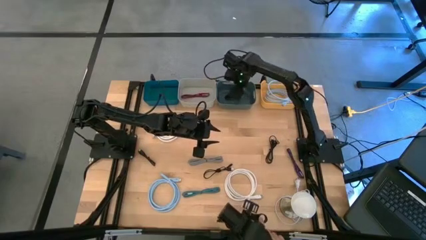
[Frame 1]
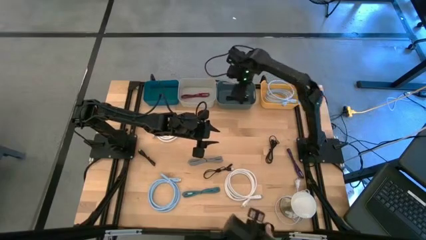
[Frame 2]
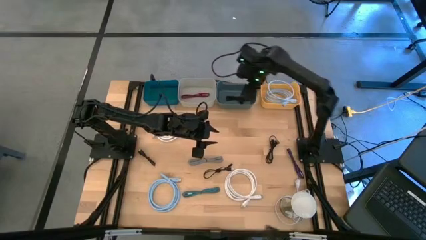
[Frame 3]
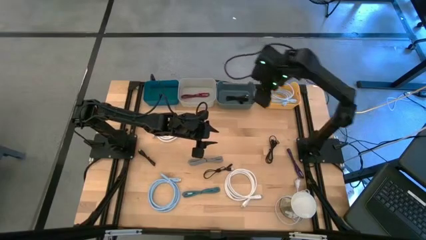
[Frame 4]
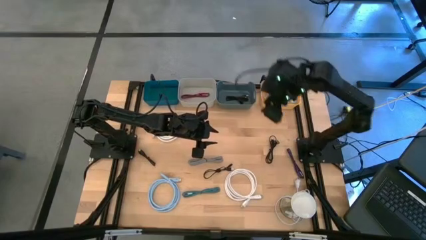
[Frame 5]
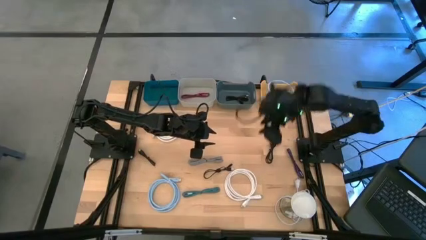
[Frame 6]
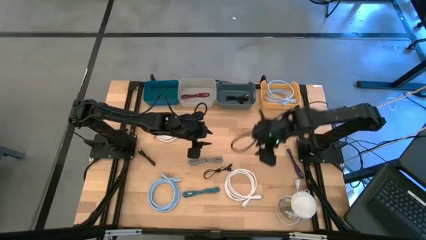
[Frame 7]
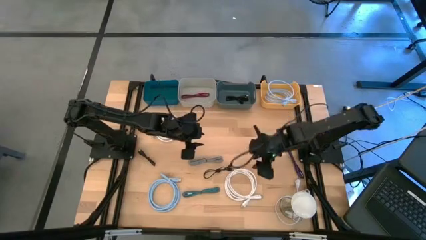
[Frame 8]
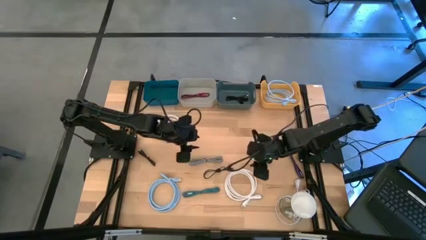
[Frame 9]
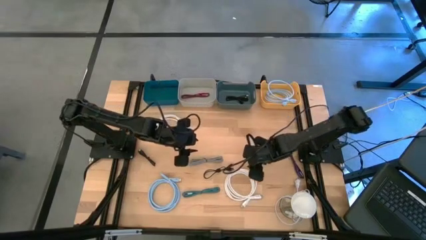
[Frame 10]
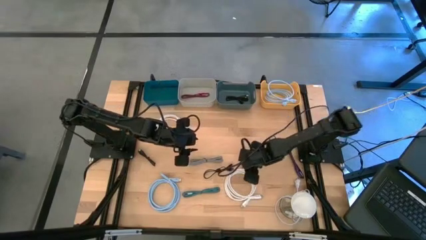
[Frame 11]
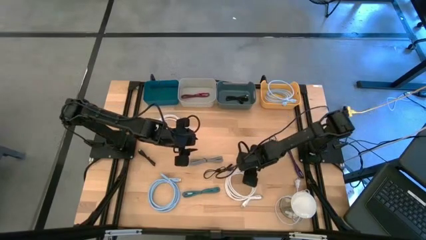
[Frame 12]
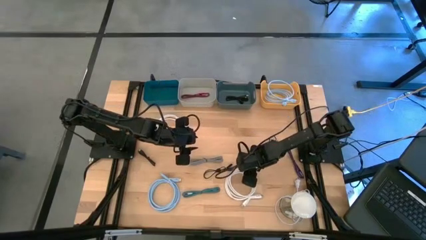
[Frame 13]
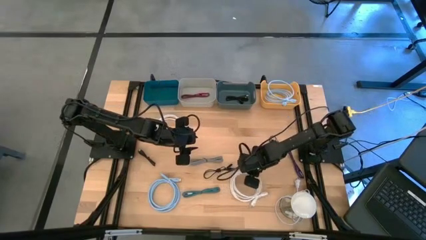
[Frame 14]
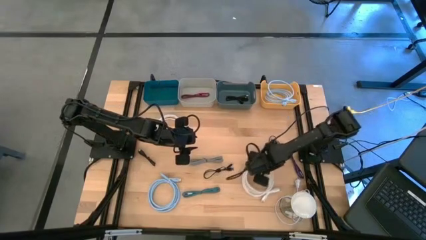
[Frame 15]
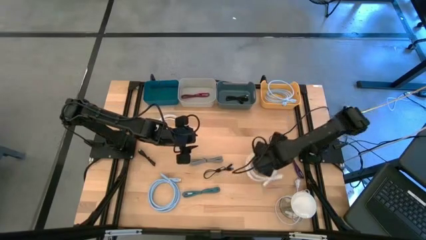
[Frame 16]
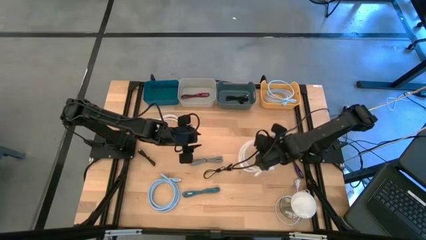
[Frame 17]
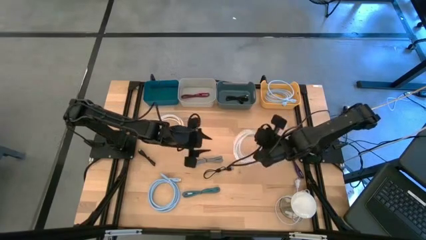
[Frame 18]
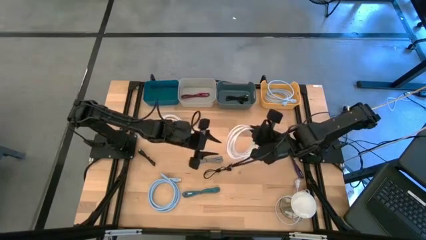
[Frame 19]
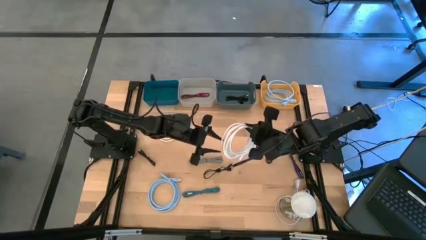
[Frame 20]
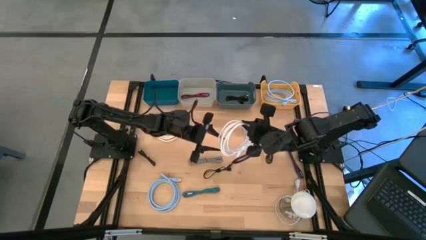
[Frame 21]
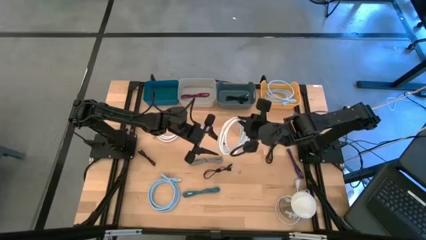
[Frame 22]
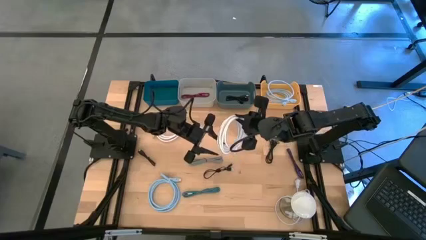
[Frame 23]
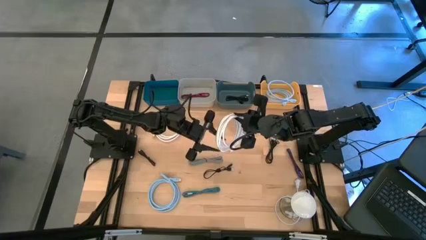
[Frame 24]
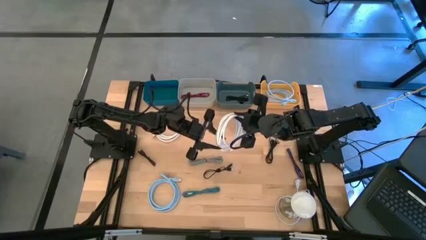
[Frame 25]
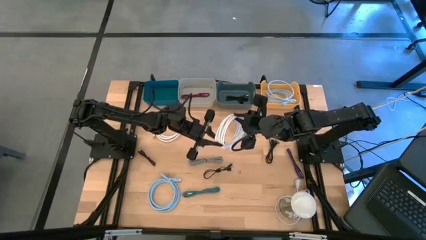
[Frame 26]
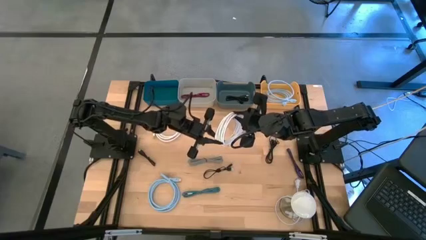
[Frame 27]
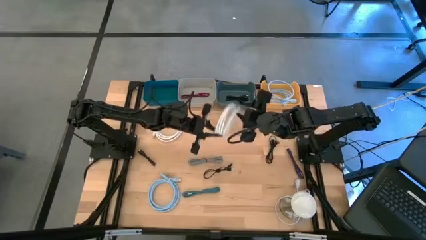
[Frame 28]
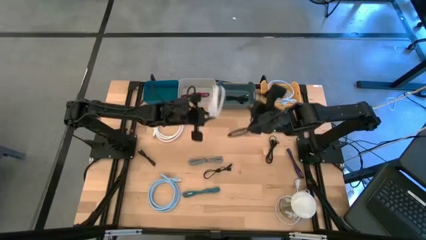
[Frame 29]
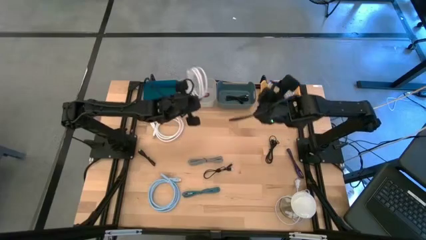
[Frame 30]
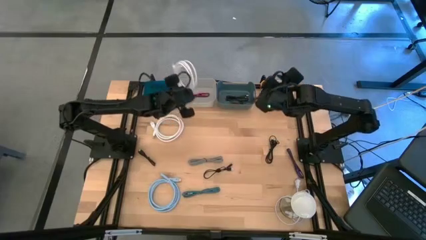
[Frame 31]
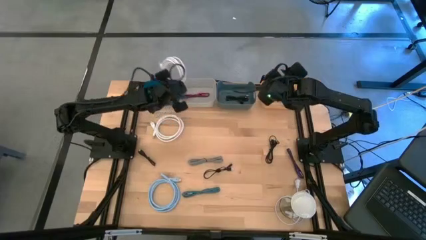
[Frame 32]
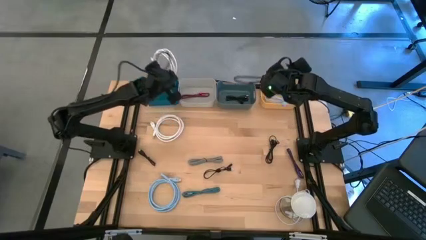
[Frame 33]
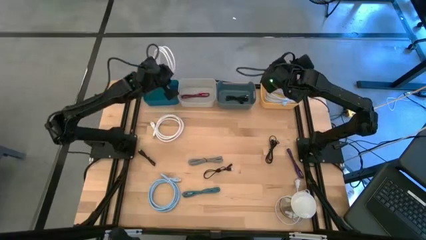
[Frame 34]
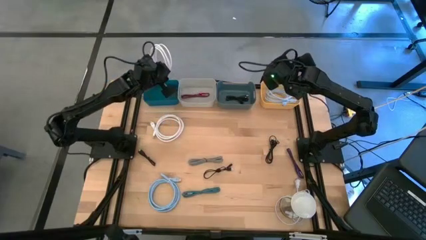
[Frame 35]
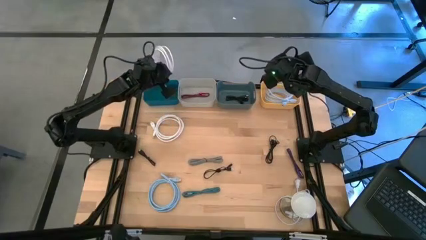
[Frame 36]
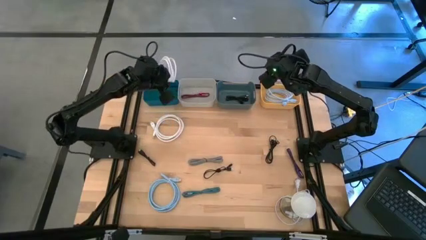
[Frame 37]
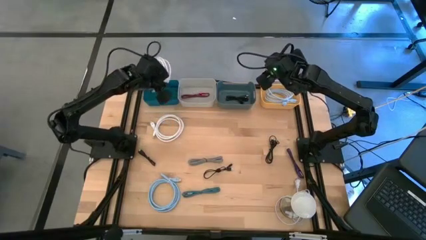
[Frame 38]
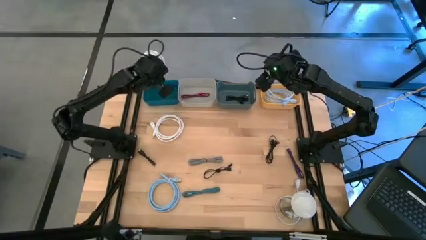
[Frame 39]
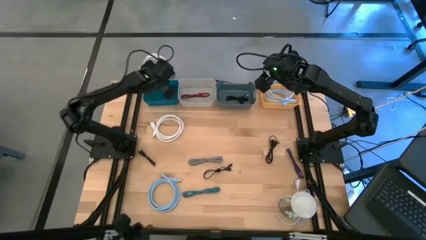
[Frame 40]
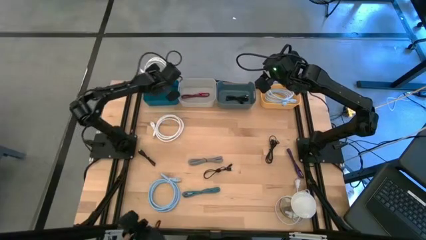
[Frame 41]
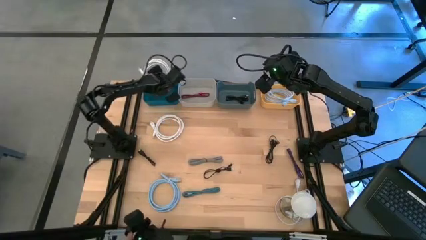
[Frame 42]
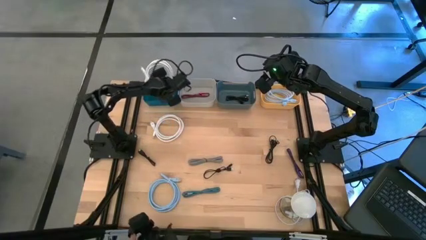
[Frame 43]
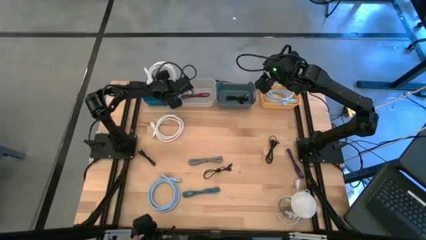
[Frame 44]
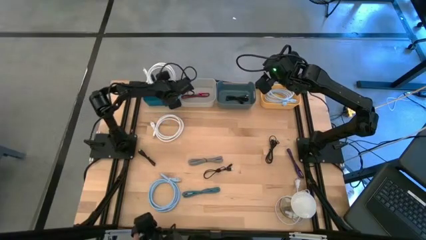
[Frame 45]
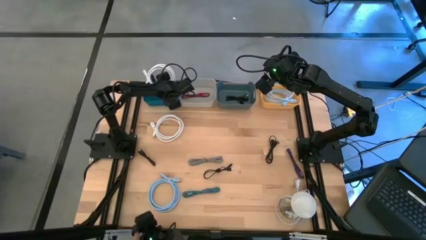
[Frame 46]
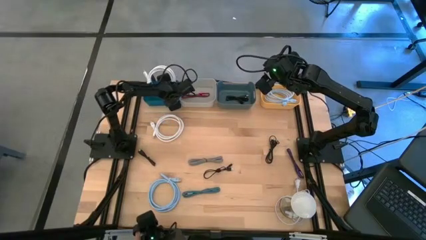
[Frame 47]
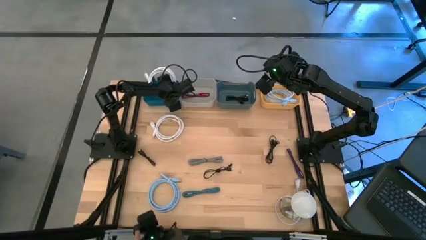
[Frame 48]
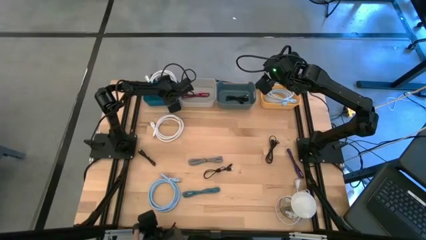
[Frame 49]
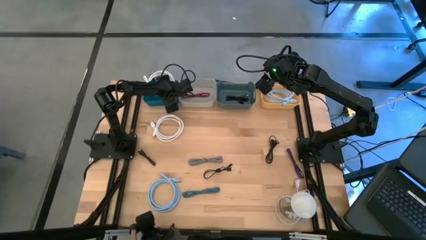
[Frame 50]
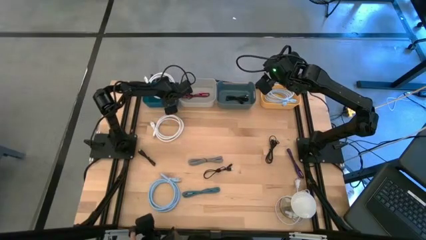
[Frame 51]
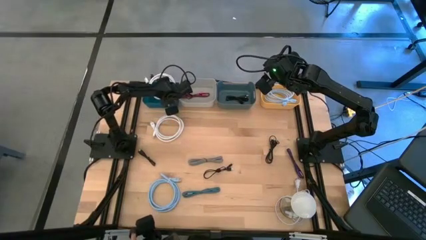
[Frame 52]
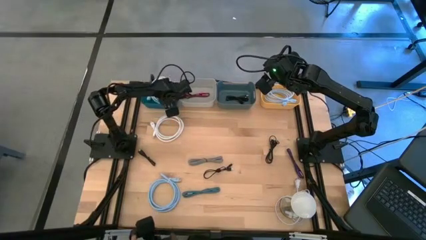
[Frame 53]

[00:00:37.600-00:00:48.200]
Task: Pick & Place USB Port
Put the white HDMI cable into the blue bin

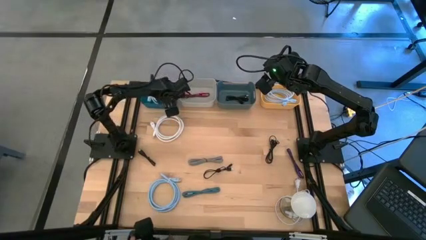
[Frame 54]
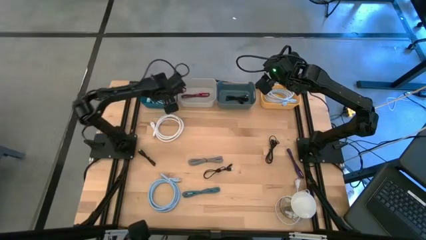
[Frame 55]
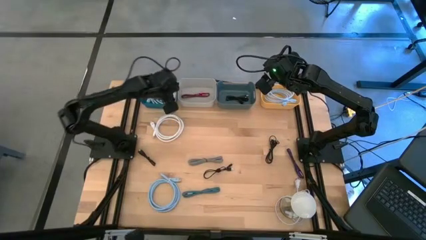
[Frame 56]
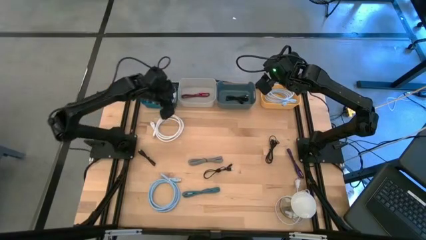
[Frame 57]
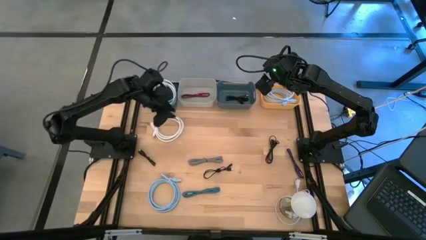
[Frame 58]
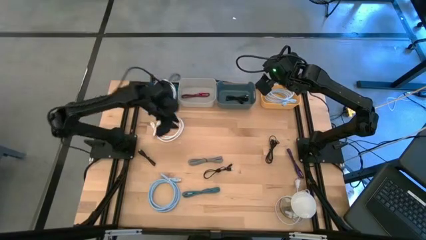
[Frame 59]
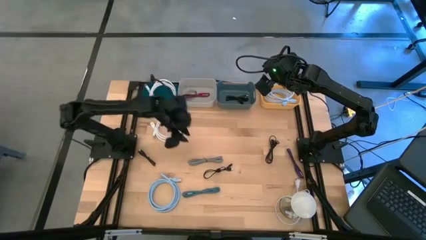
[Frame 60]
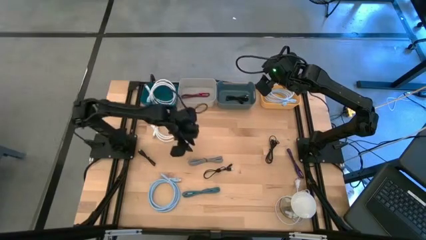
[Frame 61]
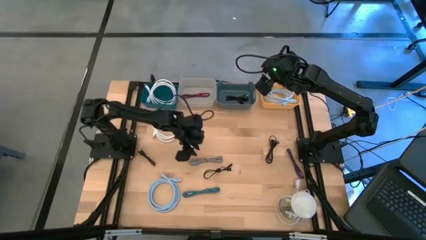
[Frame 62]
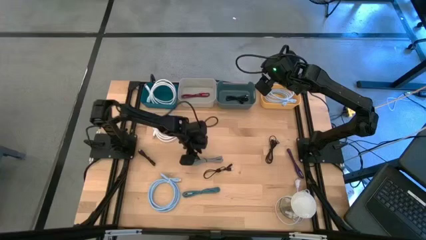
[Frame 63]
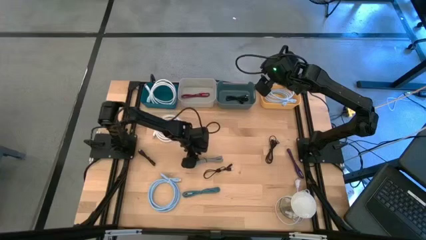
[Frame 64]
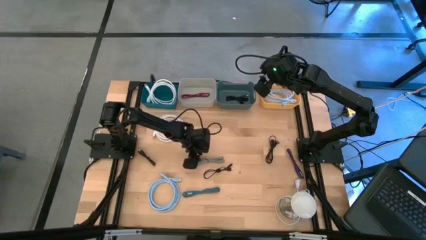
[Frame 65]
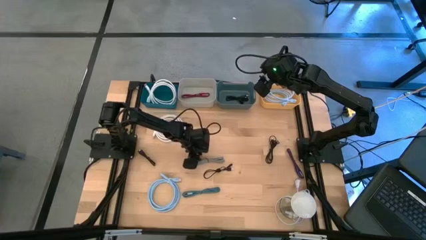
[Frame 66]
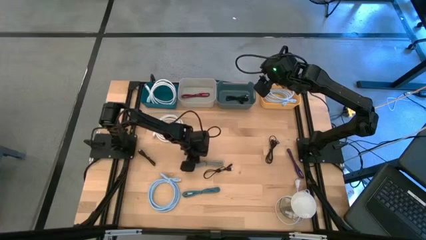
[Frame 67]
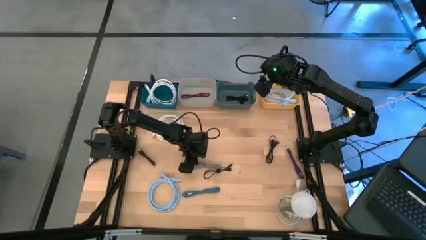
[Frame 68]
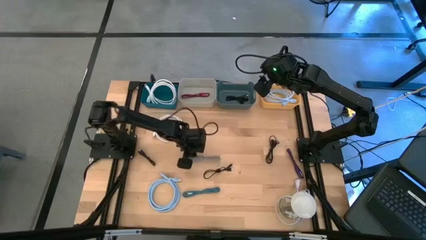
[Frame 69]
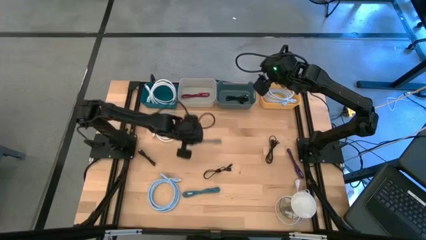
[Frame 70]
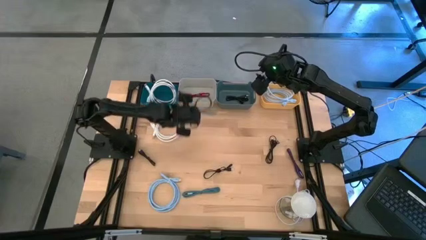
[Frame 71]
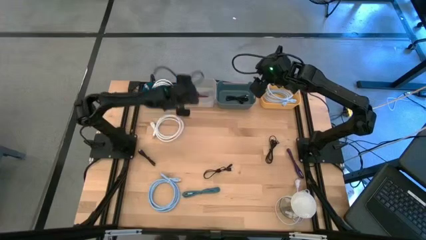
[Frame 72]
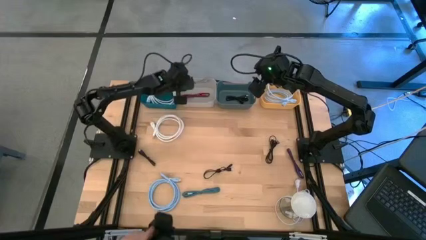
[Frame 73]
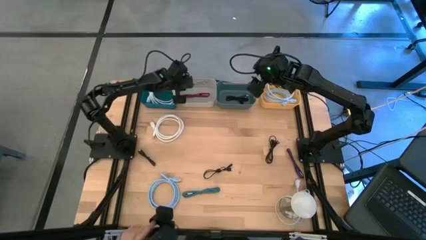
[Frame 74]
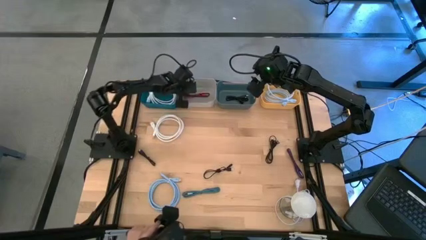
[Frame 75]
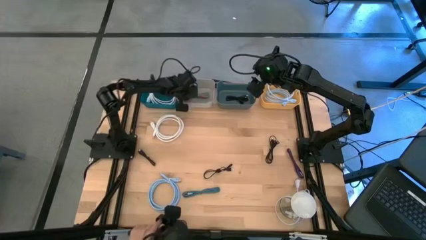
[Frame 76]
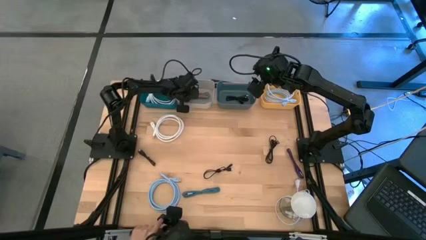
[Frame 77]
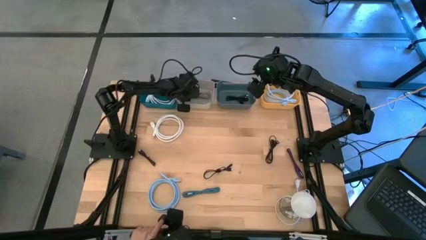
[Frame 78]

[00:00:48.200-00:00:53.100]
Put the black and white USB cable into the gray bin
